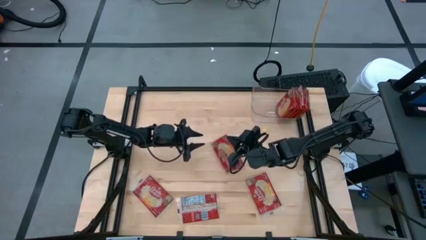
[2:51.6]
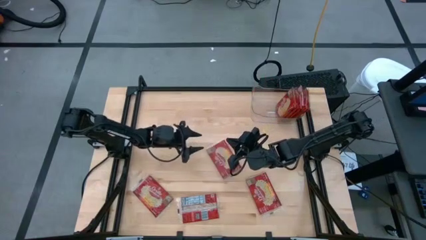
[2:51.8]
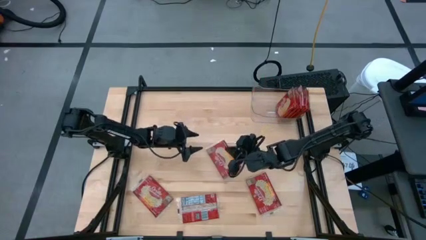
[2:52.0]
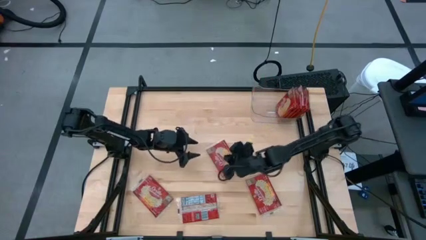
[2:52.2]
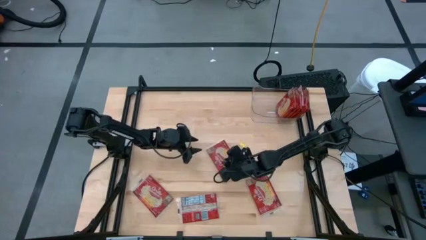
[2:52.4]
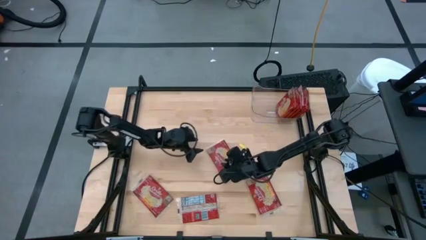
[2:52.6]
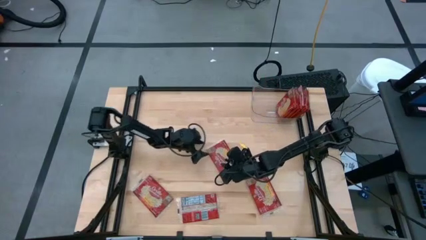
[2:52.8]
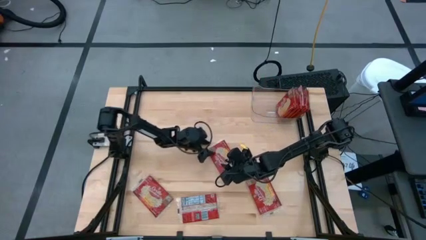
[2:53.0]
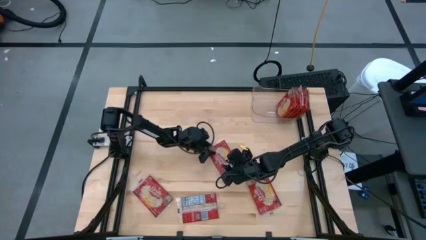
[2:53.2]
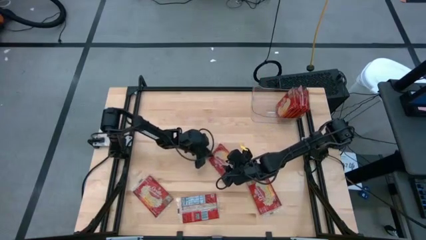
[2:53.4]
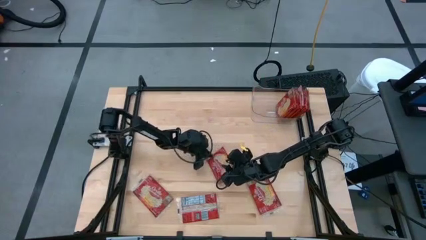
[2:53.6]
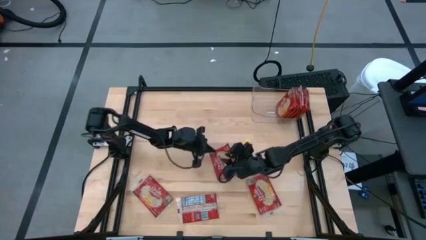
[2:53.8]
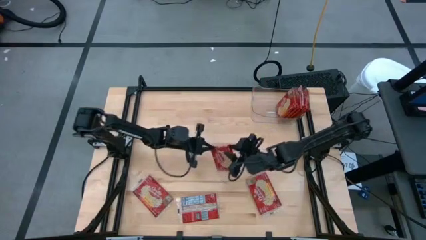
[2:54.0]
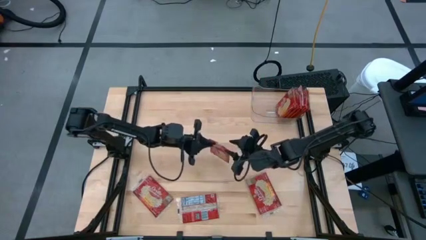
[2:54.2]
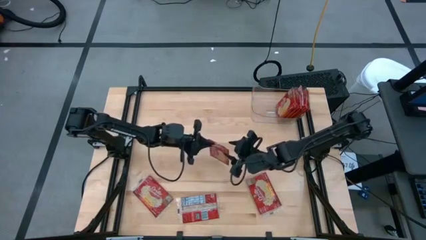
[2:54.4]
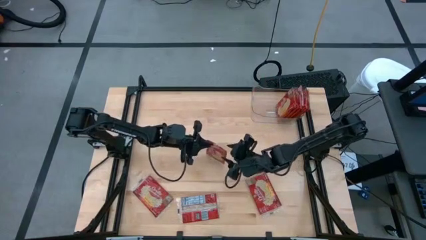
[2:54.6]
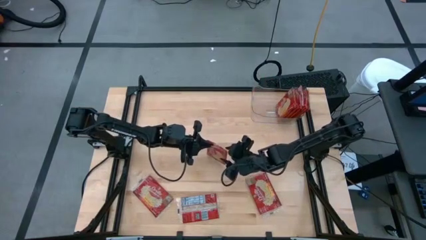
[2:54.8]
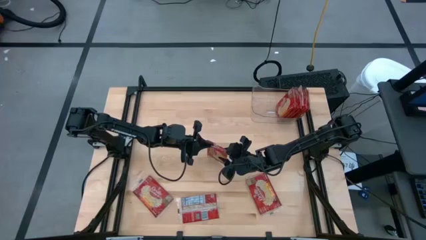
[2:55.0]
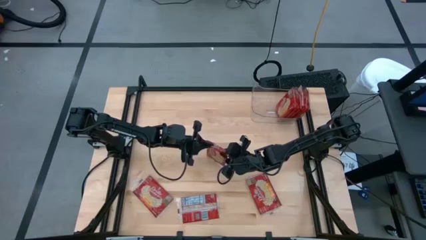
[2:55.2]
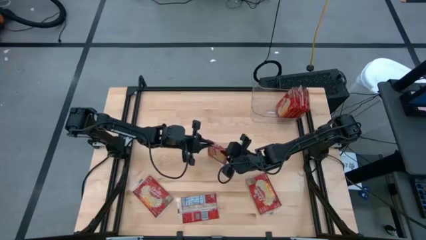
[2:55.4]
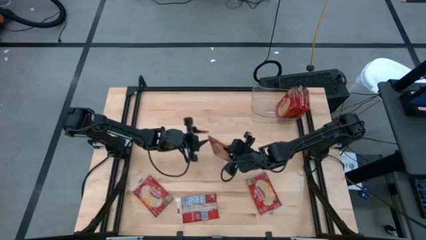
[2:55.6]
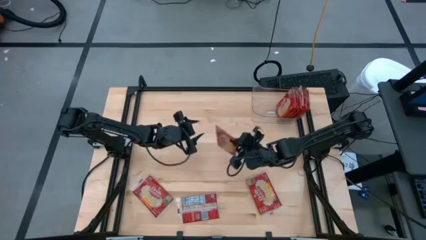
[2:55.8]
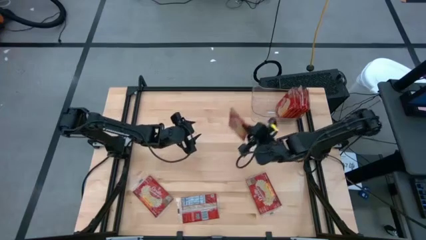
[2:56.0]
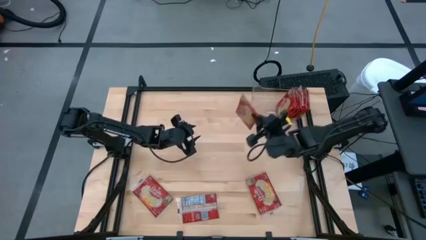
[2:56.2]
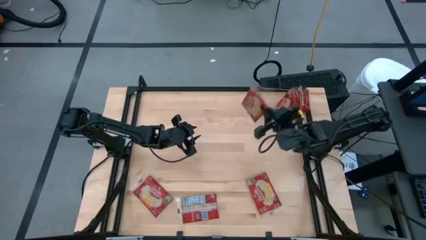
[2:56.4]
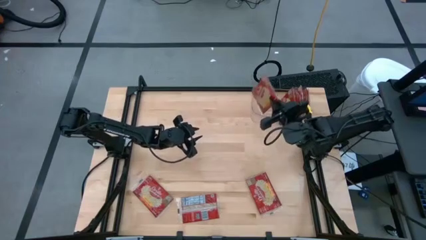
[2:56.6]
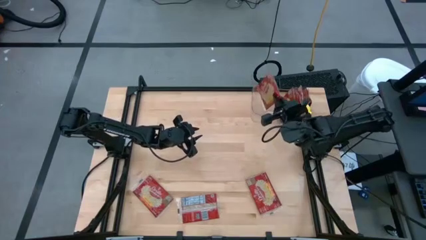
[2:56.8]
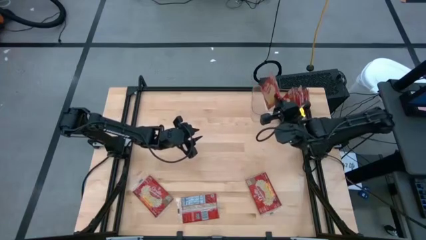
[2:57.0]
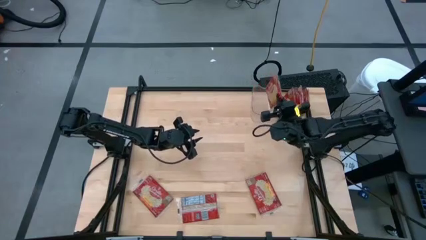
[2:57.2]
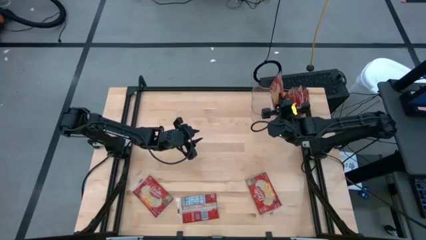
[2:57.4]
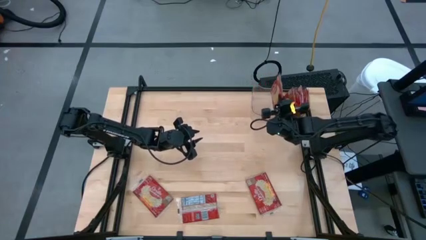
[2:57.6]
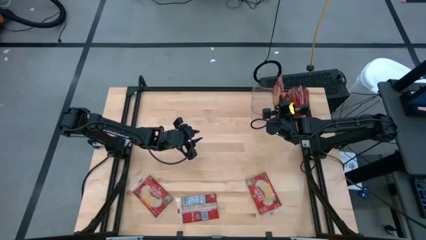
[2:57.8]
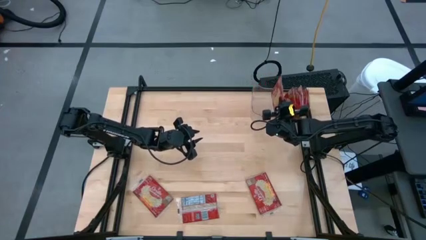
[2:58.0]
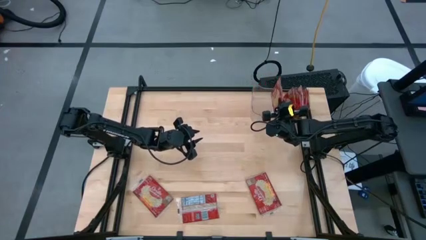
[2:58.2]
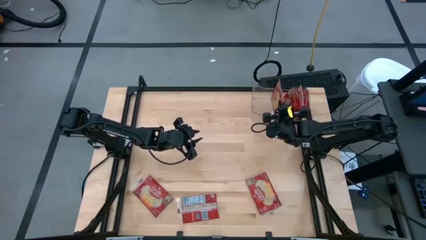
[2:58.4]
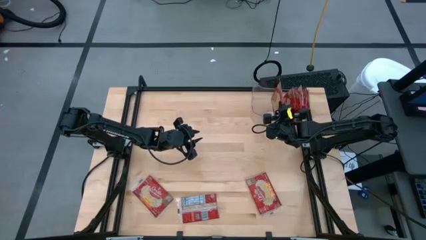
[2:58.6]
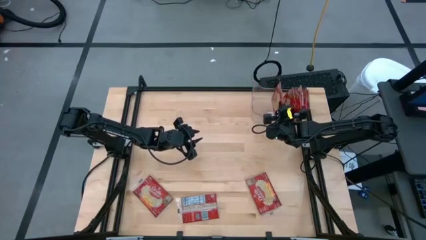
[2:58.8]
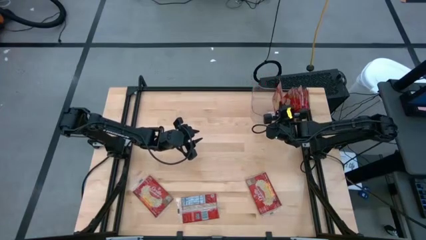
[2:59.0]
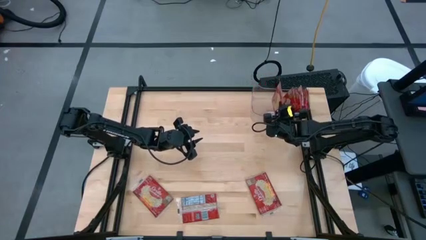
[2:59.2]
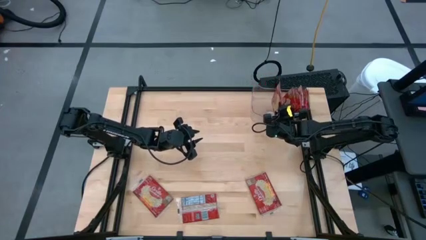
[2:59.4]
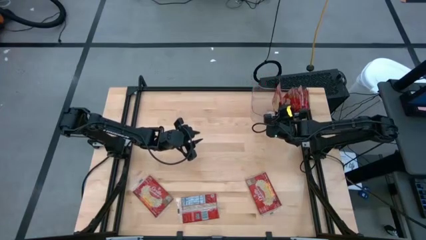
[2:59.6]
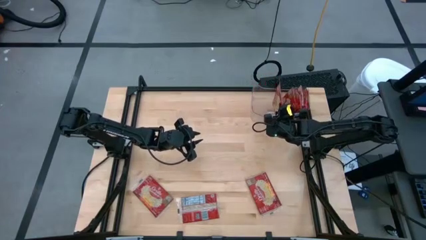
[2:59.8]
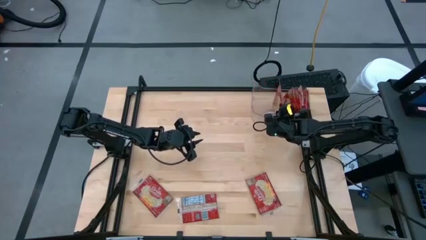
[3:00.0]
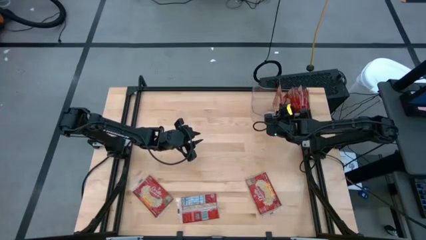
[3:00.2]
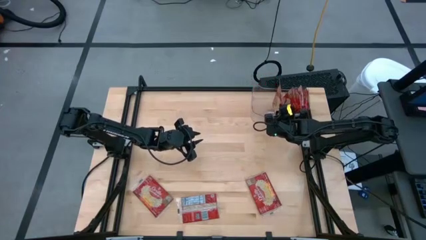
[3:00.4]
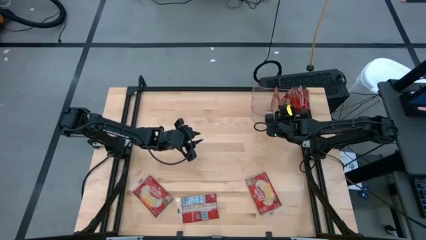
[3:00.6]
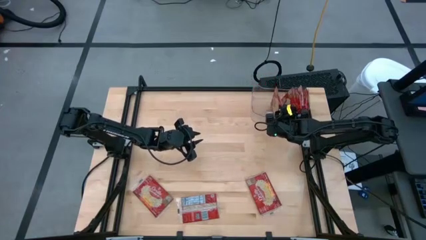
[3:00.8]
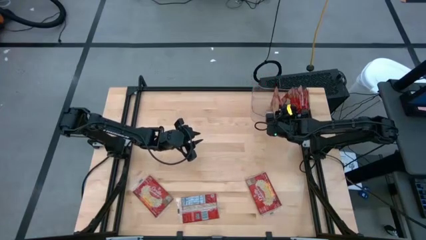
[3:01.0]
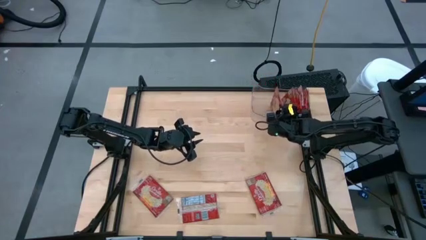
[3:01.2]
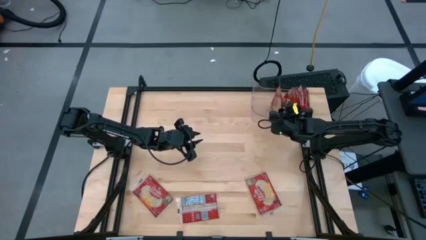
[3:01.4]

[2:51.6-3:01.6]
Task: Sort popcorn bags into baskets
Put the red popcorn bag into the transparent bin

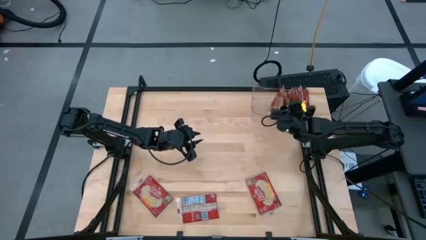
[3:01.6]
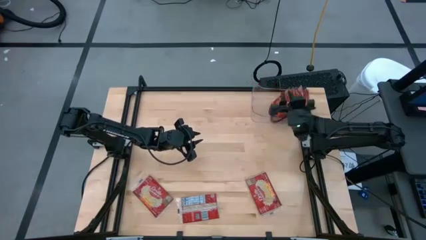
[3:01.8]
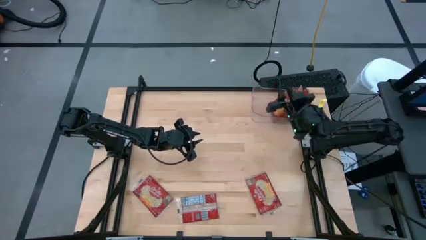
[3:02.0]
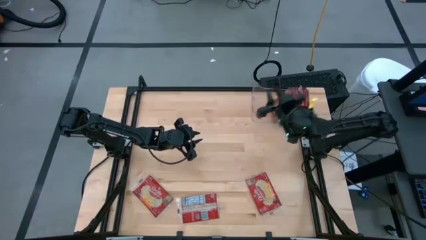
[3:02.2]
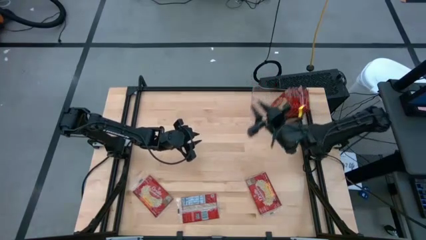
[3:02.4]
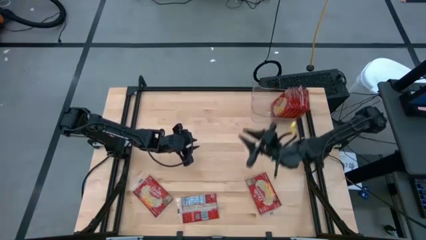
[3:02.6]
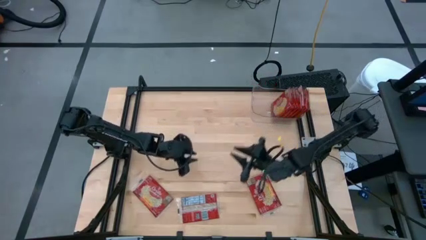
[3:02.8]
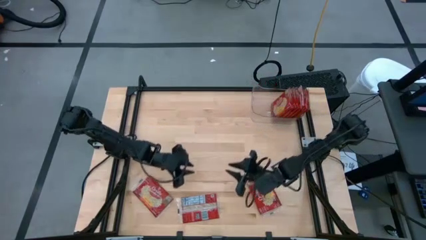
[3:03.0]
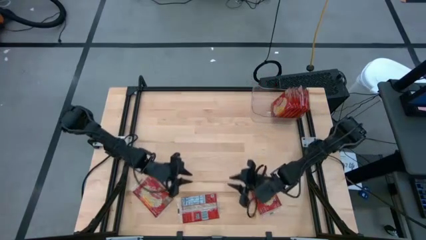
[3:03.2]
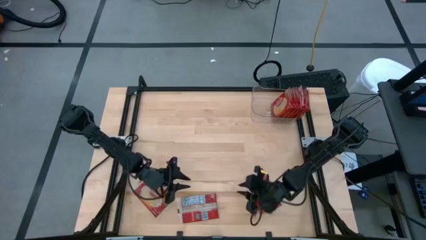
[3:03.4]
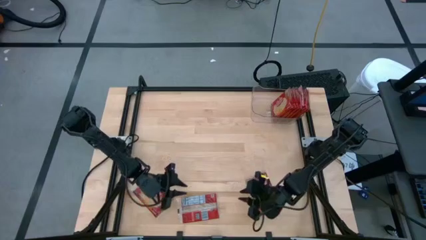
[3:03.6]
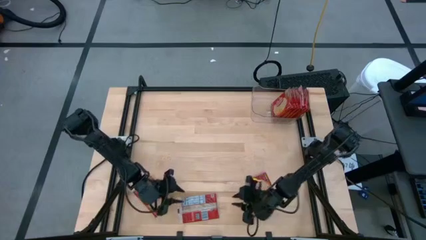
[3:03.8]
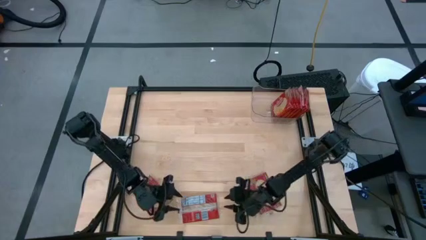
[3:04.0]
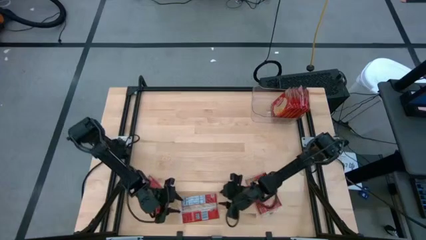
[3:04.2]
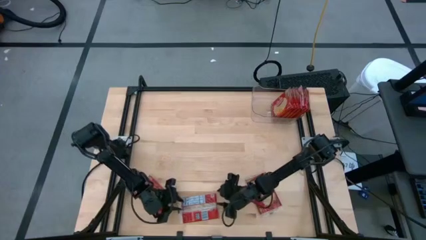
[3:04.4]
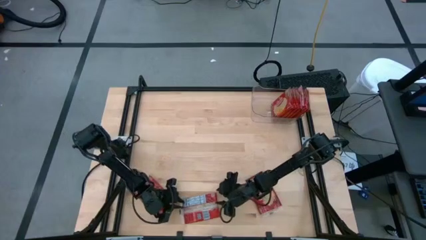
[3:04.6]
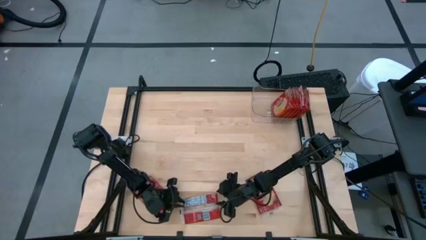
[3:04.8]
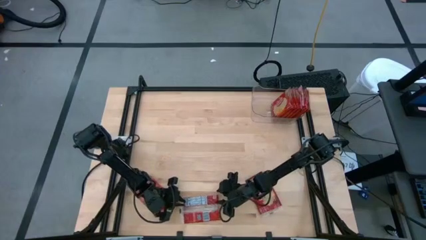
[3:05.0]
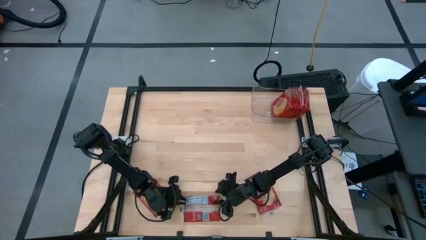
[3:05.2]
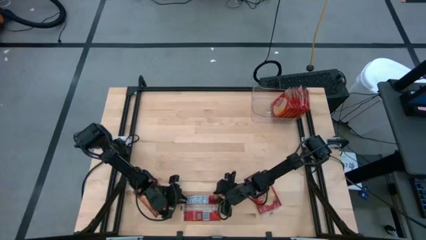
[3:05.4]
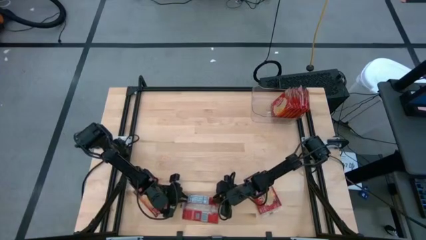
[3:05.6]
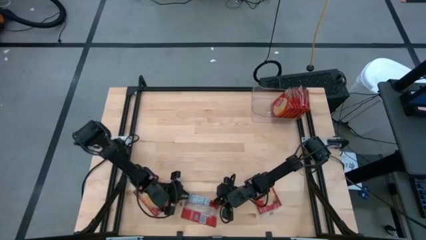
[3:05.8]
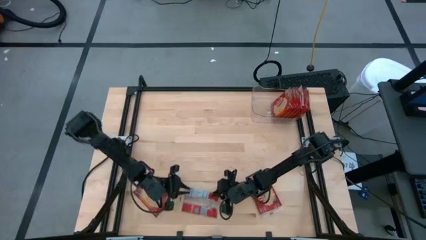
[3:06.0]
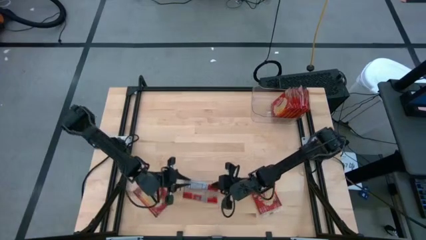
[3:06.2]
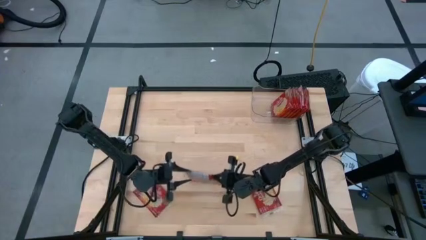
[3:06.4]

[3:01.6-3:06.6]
Put the red popcorn bag into the transparent bin

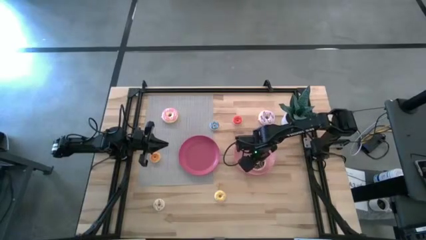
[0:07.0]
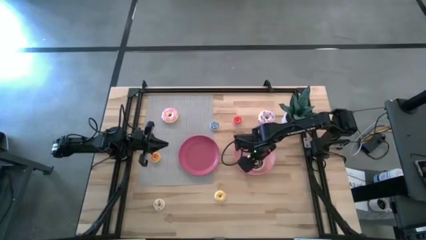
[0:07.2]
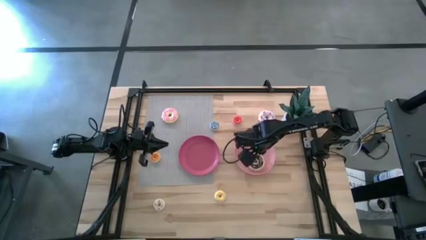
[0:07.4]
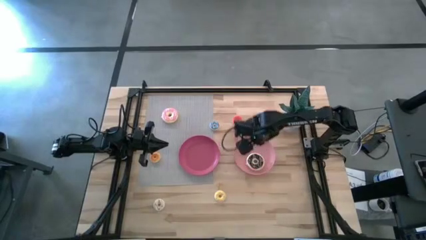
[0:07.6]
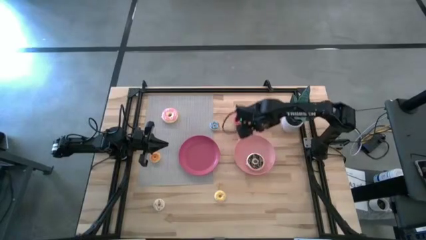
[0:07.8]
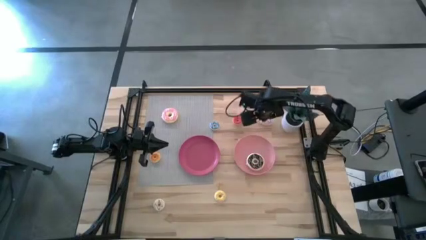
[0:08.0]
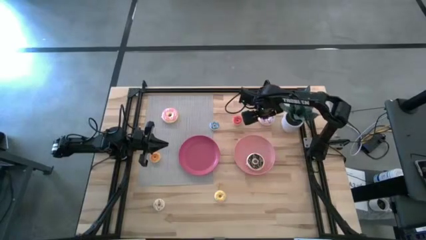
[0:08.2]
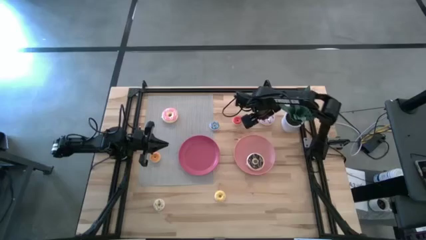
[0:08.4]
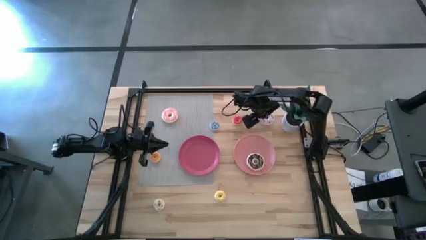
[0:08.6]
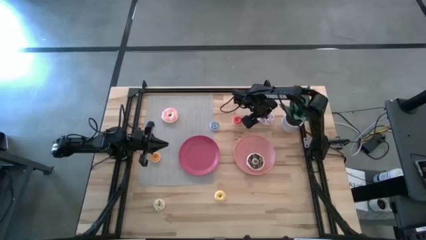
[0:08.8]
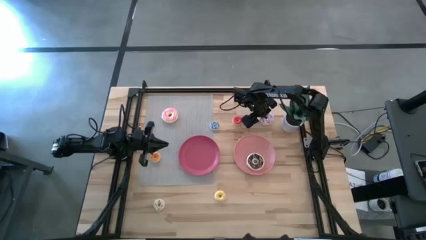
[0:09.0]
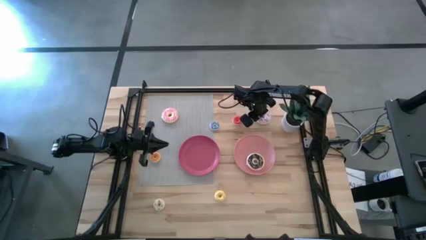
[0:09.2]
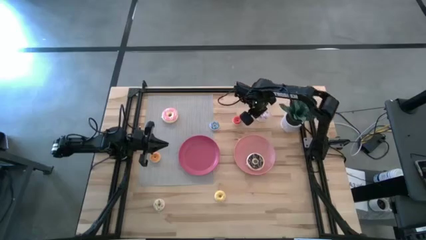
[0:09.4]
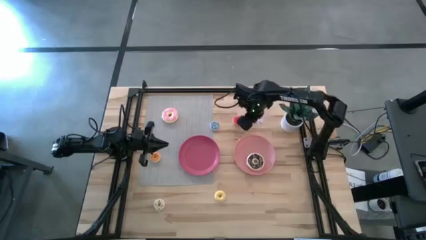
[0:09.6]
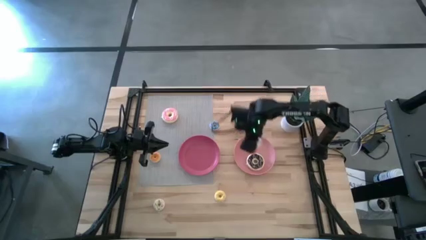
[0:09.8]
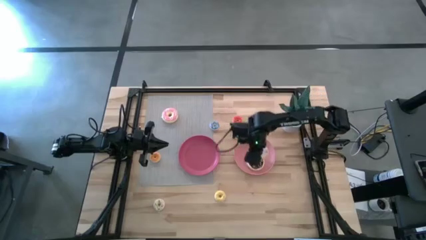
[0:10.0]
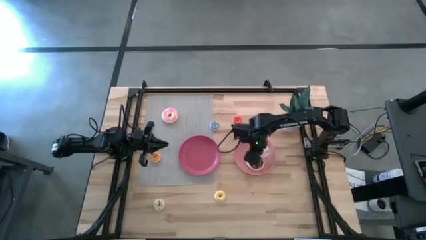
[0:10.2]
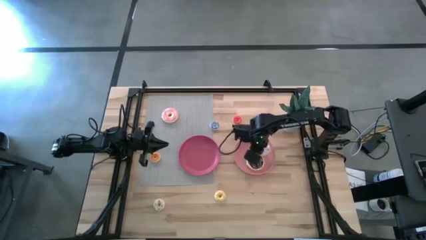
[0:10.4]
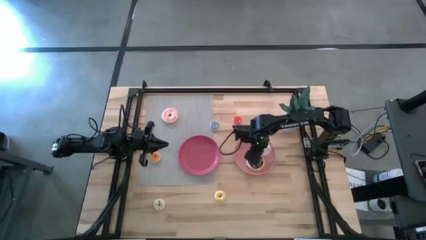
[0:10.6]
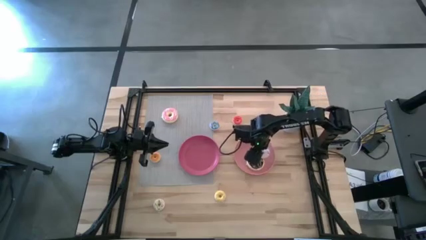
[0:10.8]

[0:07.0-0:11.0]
Task: Pick & Place donuts
Put the big purple doughnut into the light pink plate
